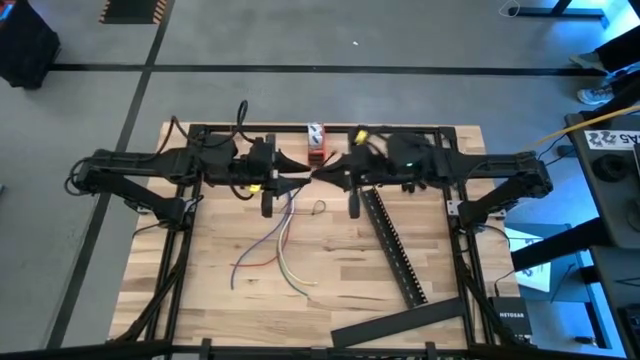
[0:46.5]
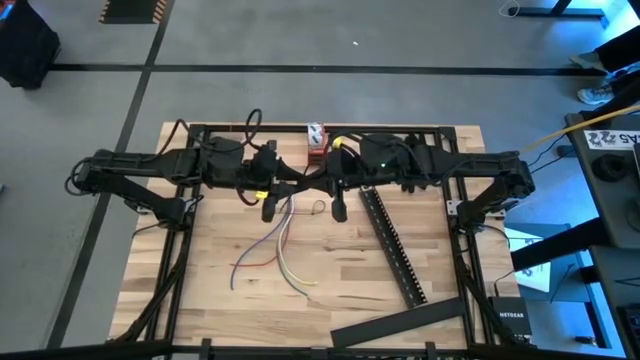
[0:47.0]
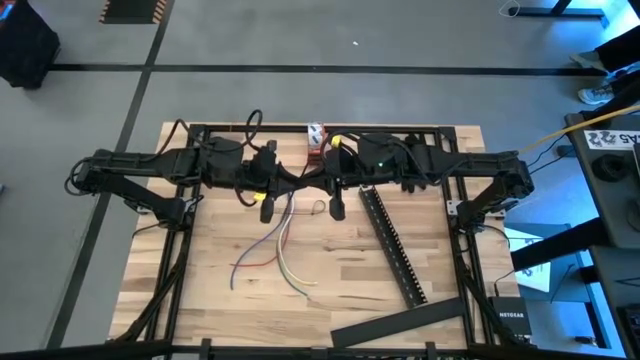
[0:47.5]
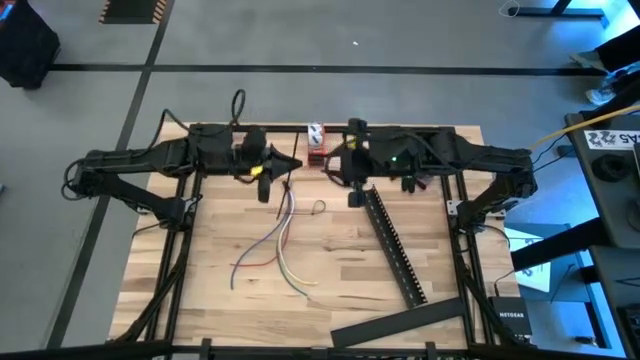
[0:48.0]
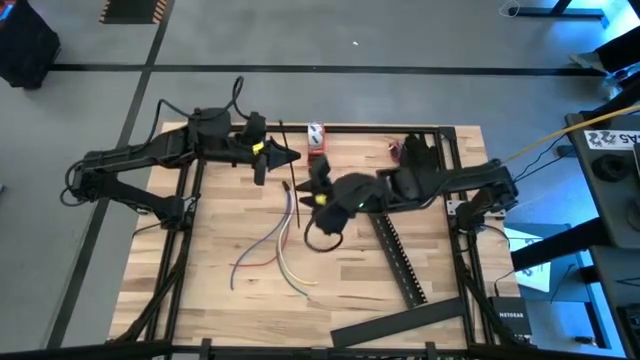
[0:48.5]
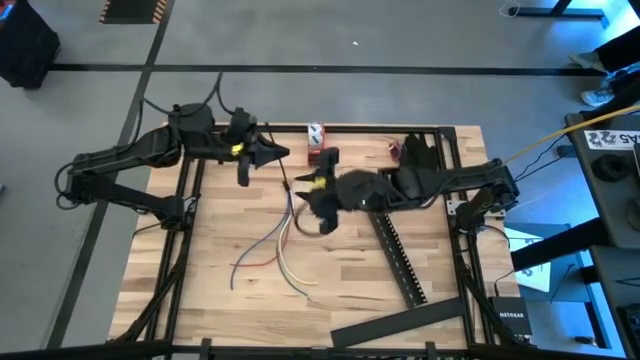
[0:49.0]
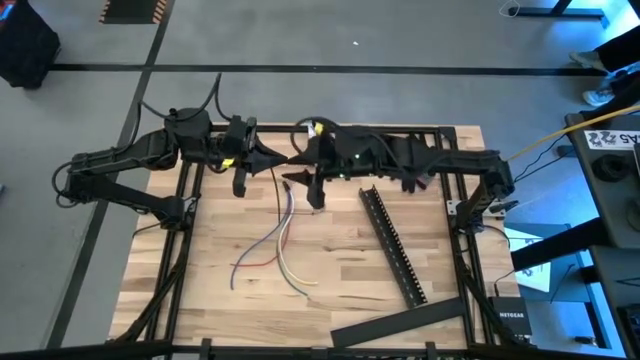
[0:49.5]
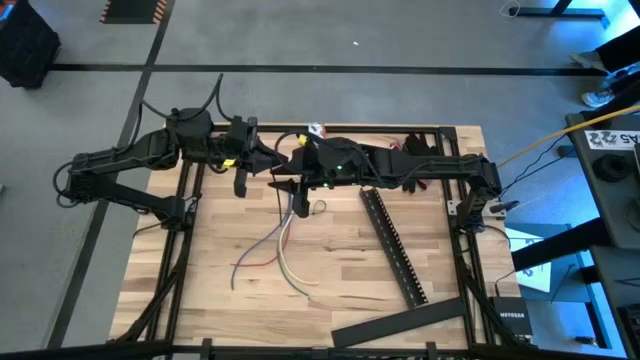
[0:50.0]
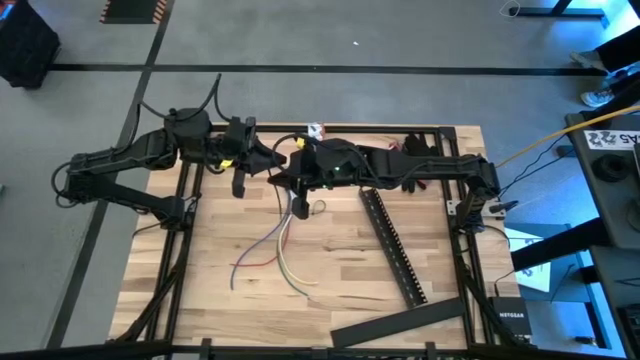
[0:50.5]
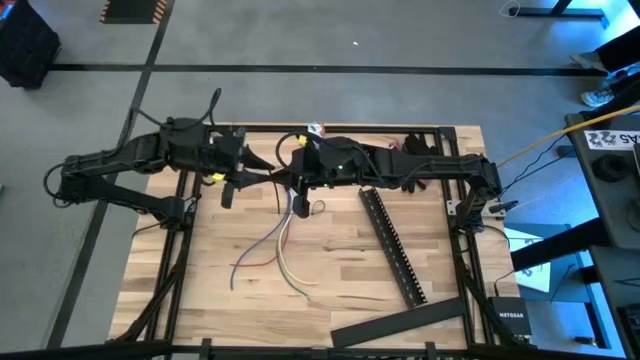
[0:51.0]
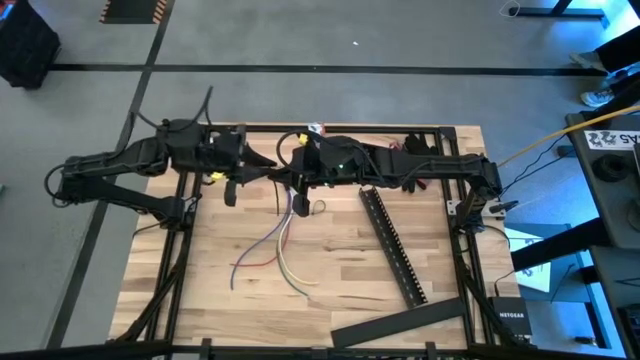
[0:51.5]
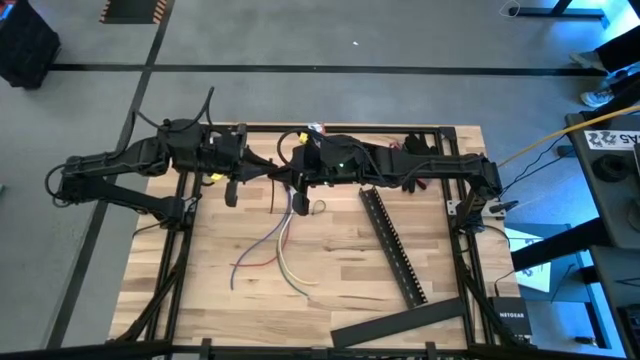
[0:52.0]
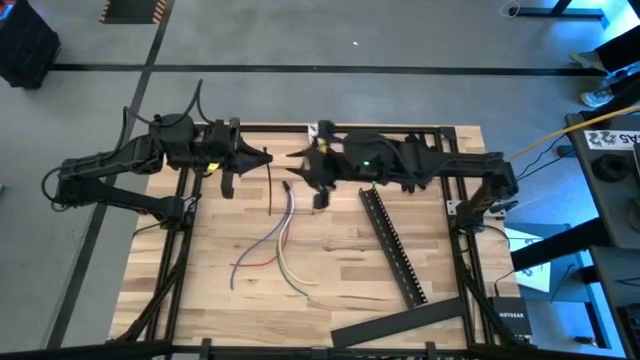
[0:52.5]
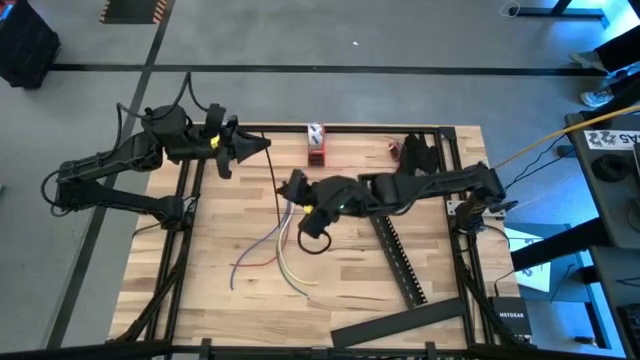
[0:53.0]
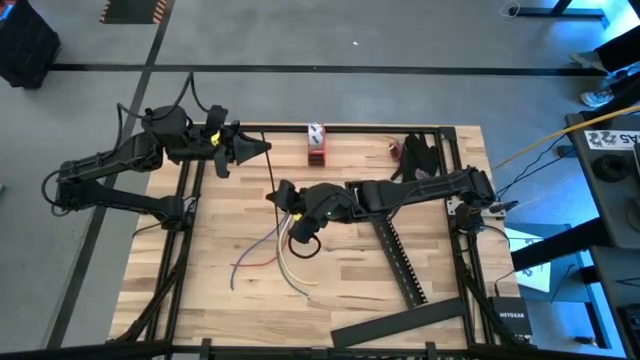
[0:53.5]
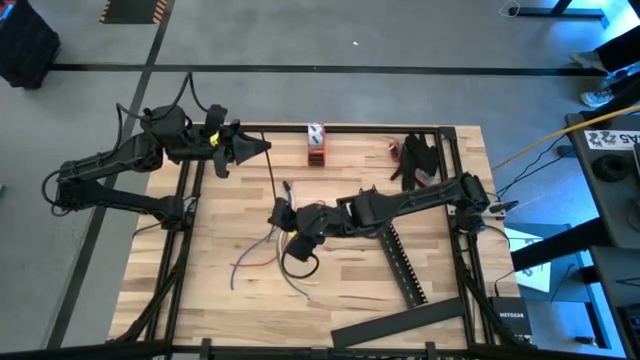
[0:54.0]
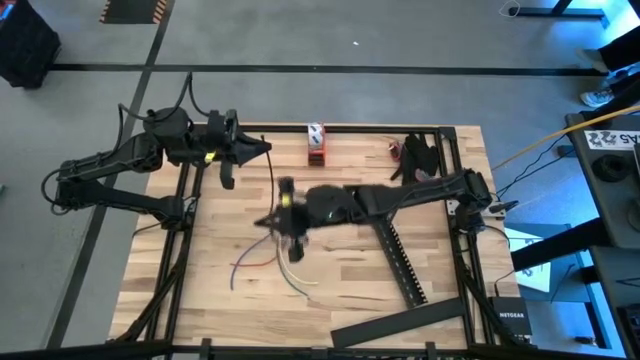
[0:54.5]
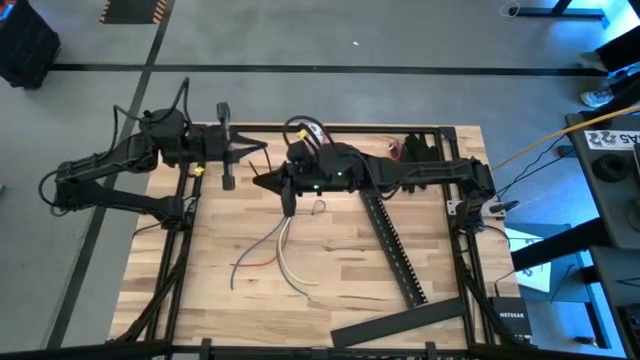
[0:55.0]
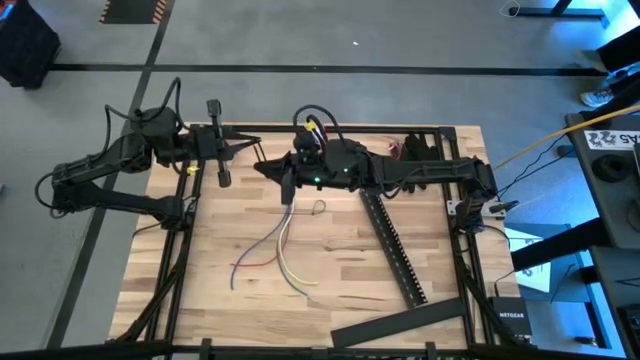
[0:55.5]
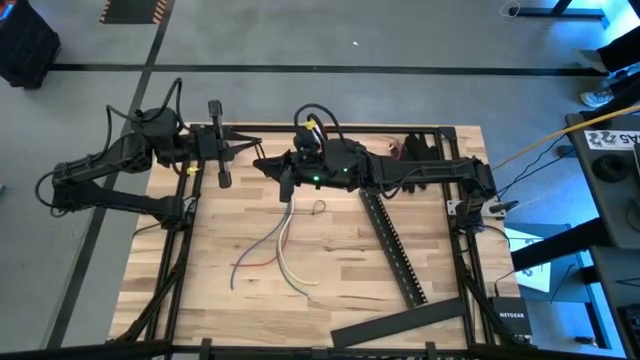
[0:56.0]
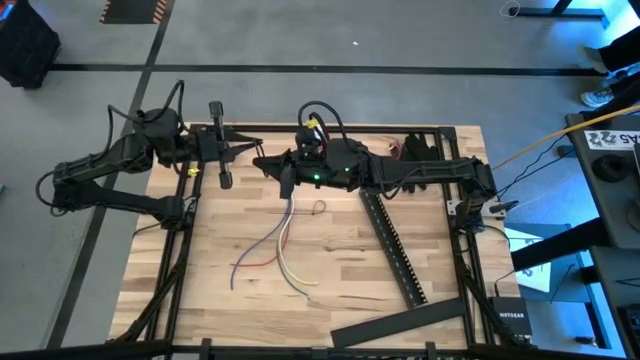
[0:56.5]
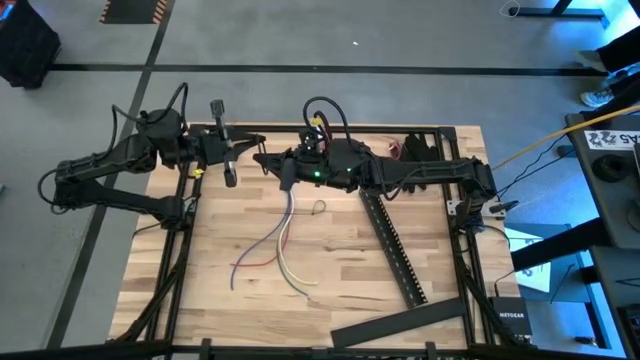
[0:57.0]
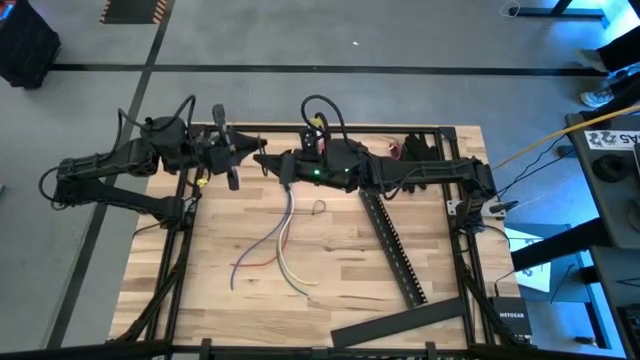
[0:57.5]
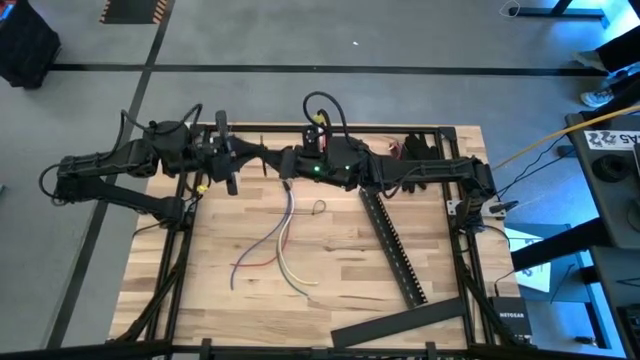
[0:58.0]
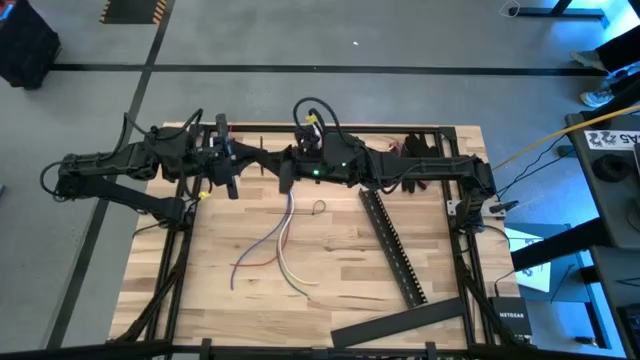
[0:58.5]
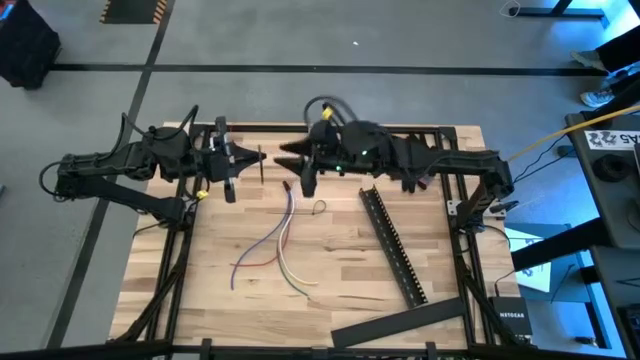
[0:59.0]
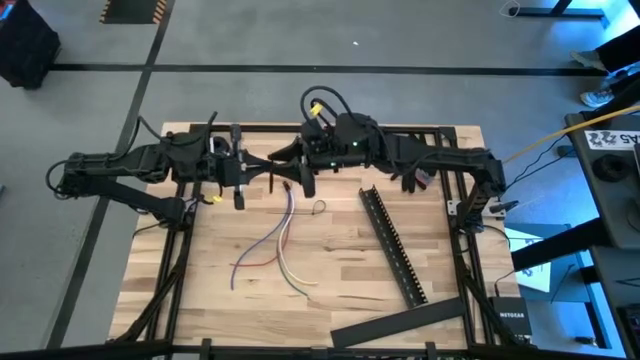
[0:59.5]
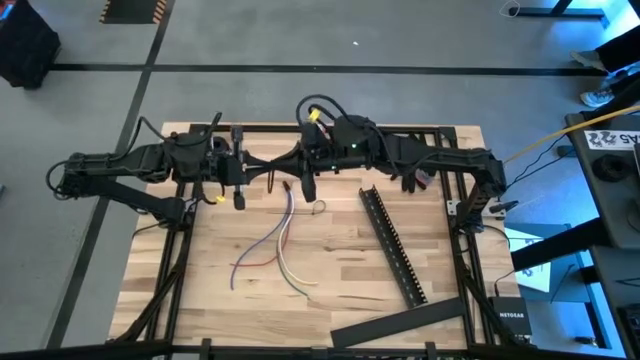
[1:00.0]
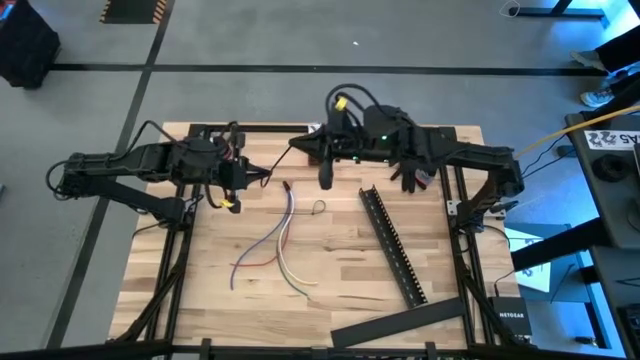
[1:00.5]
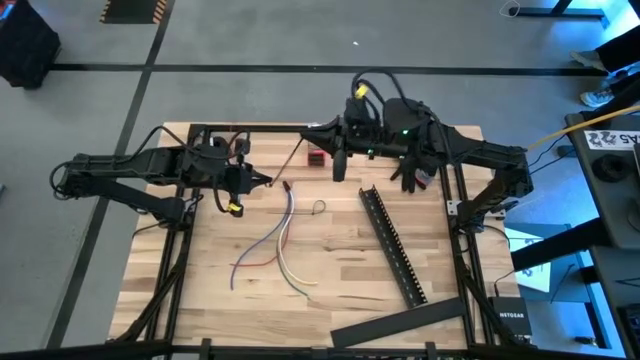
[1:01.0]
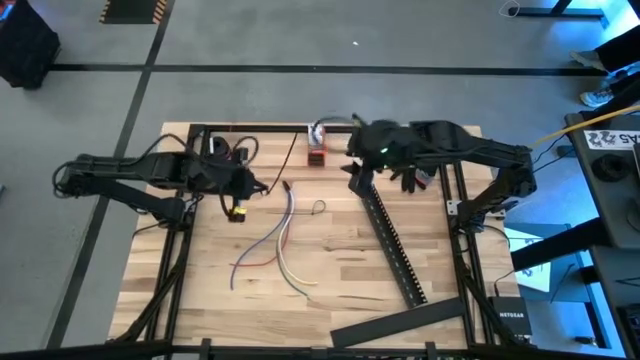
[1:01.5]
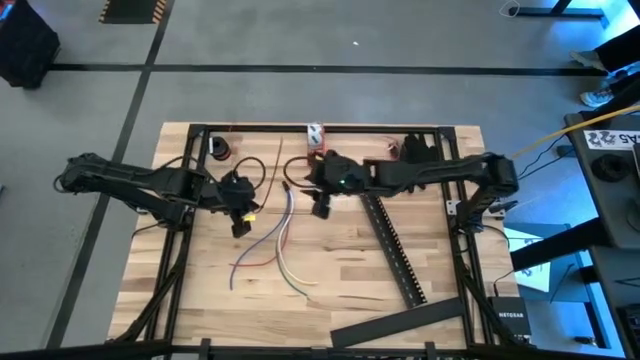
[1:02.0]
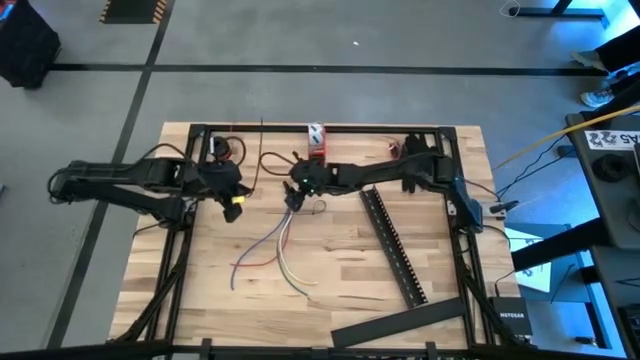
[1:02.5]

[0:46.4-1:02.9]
Task: Ziptie cables
Wrap the black zip tie on the cable

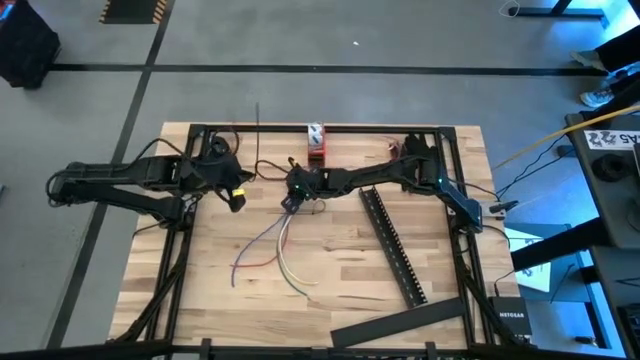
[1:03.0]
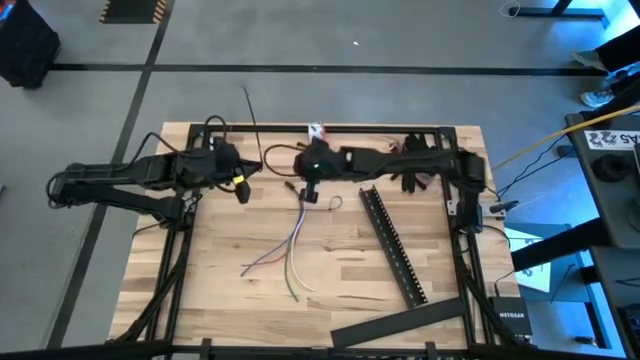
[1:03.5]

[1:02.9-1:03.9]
Wrap the black zip tie on the cable

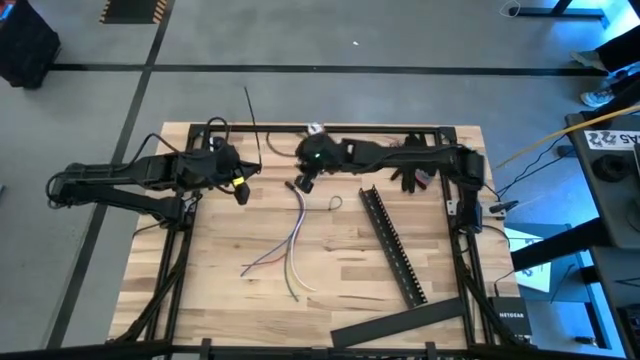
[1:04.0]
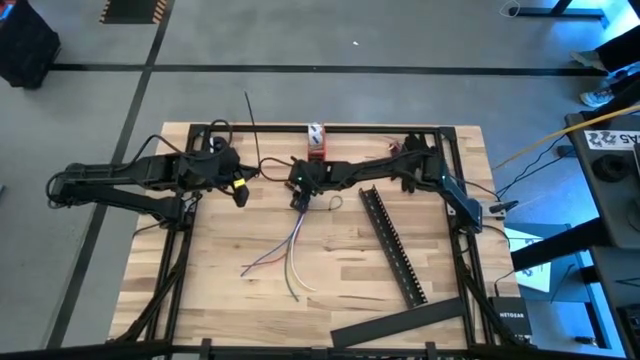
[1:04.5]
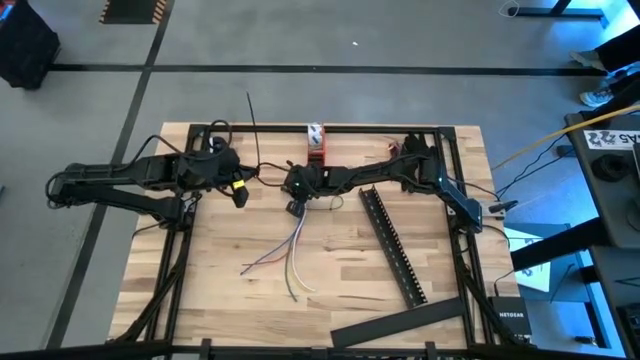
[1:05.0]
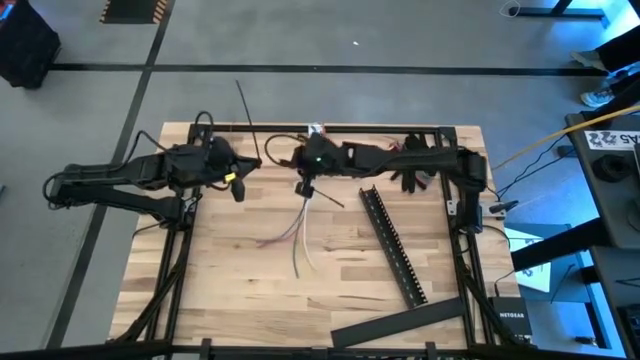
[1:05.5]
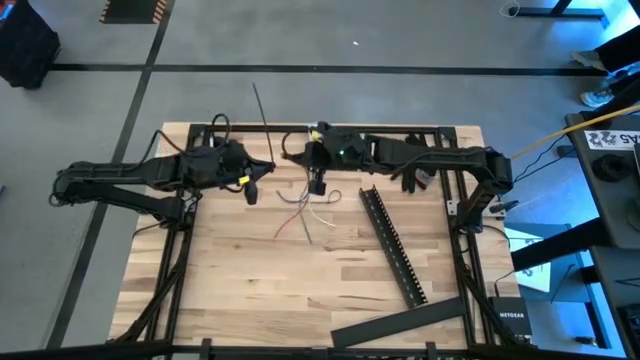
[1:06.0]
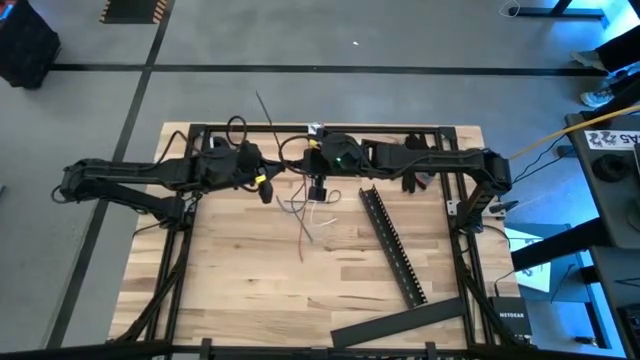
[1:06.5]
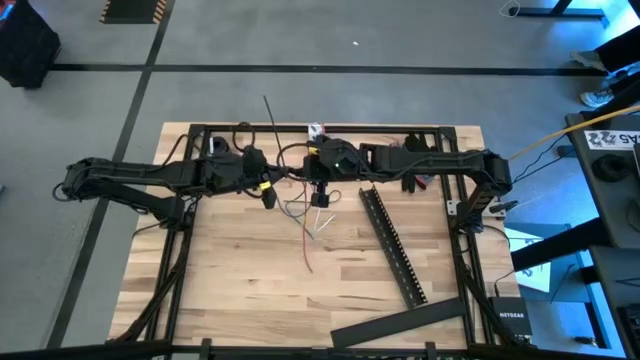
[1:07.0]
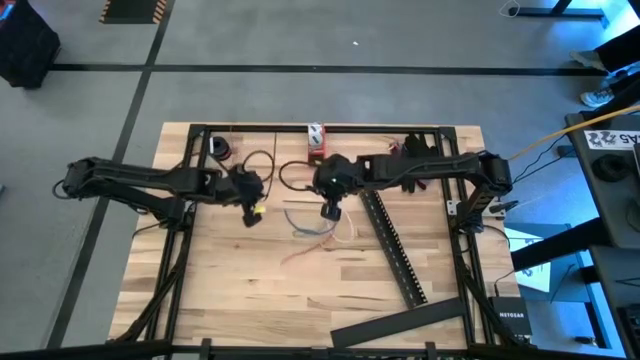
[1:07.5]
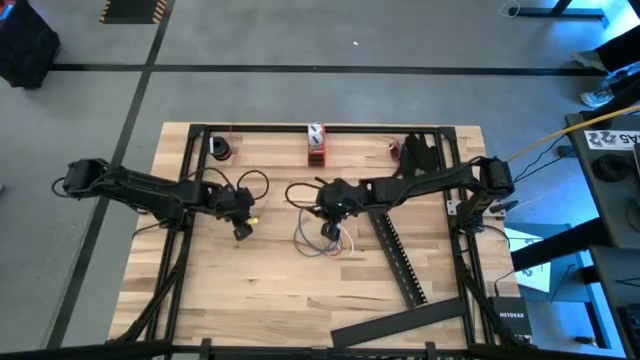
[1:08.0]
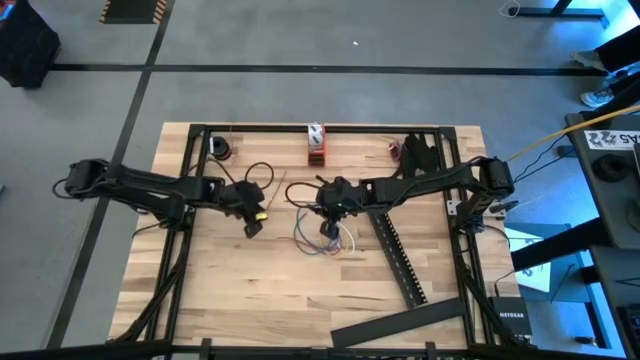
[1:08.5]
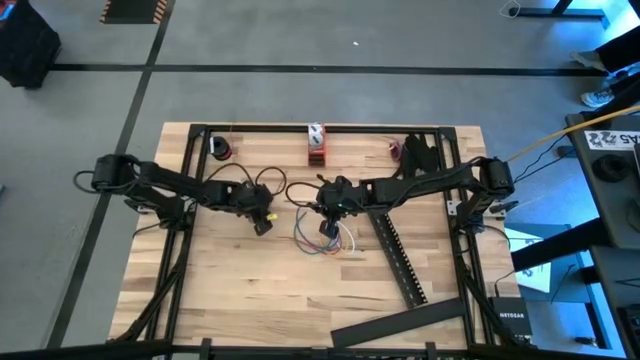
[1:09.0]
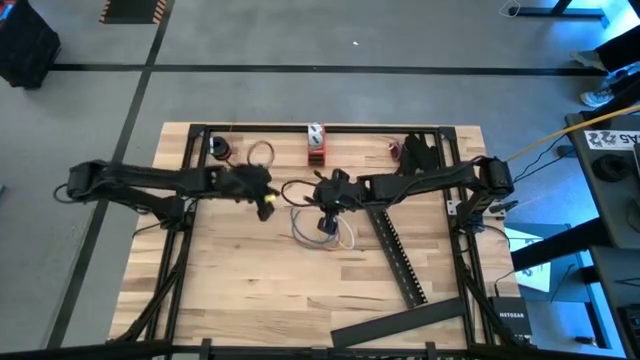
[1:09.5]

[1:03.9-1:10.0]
Wrap the black zip tie on the cable
